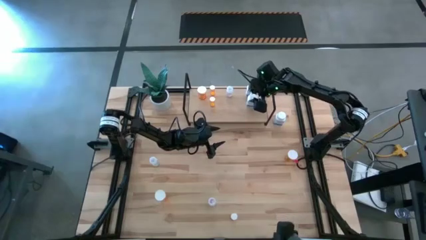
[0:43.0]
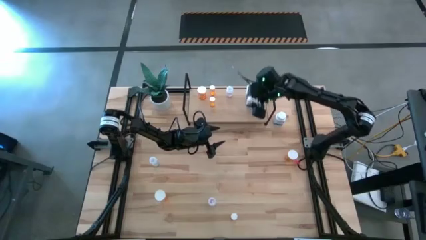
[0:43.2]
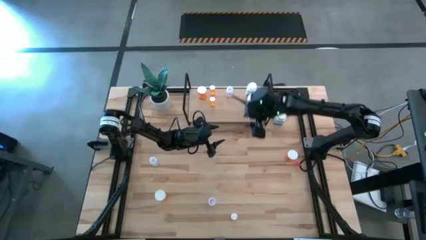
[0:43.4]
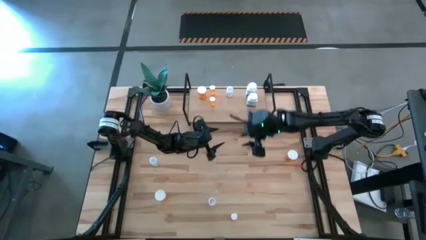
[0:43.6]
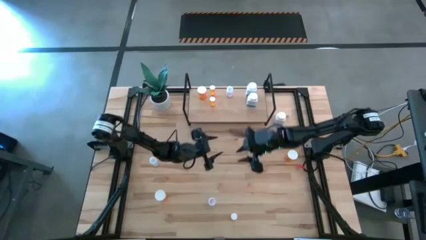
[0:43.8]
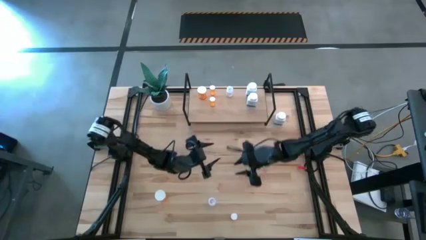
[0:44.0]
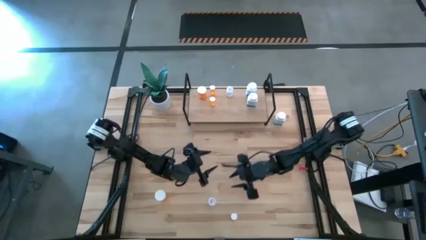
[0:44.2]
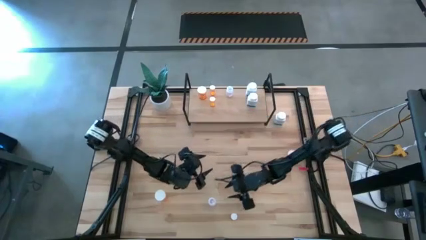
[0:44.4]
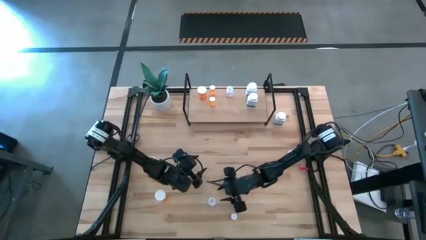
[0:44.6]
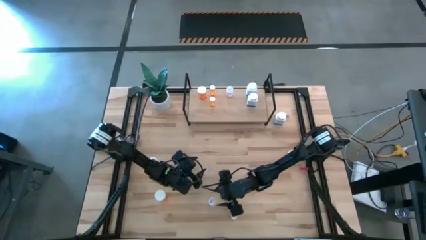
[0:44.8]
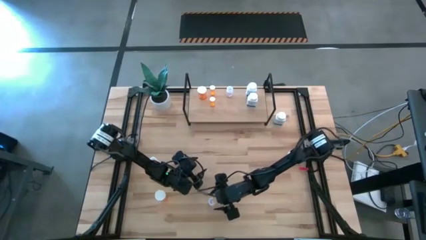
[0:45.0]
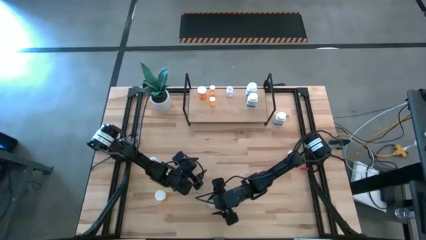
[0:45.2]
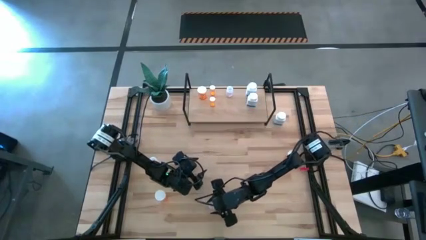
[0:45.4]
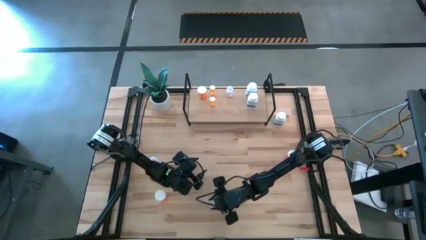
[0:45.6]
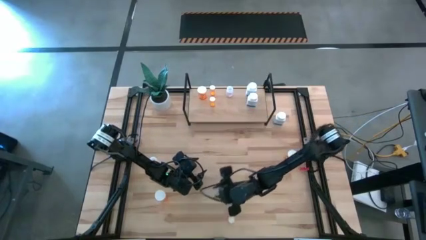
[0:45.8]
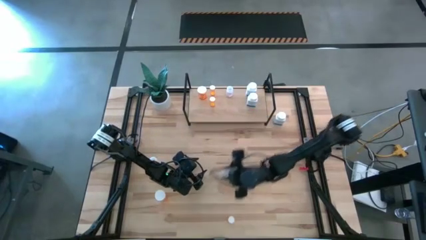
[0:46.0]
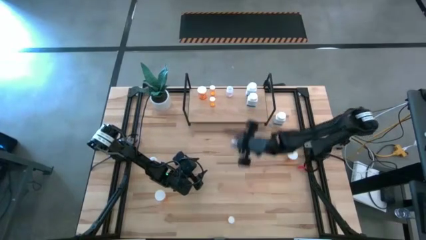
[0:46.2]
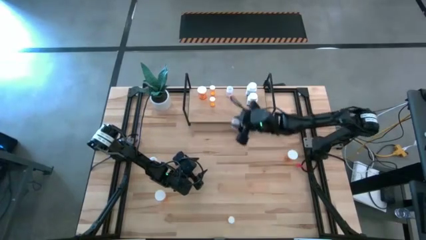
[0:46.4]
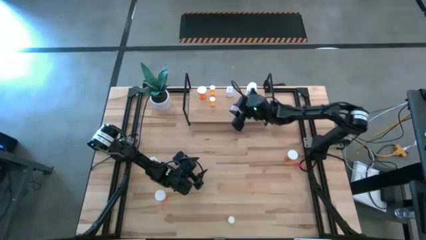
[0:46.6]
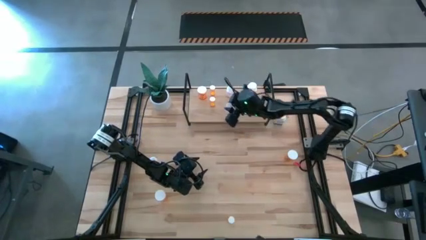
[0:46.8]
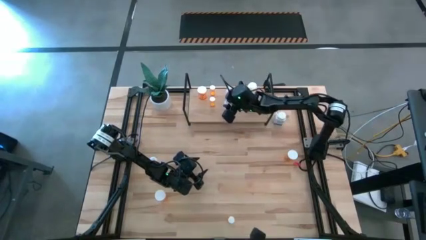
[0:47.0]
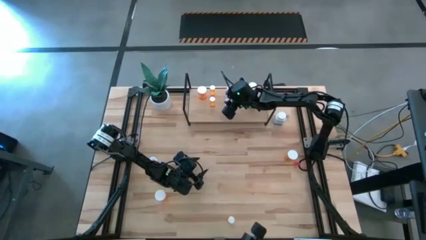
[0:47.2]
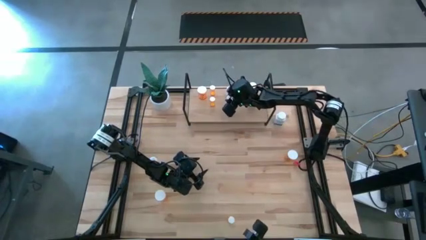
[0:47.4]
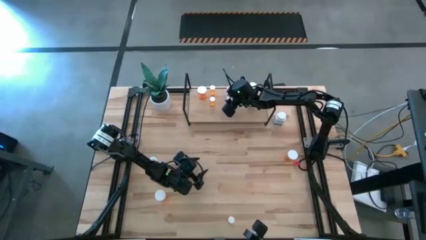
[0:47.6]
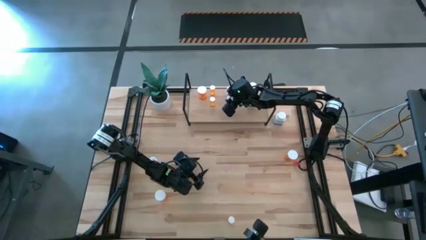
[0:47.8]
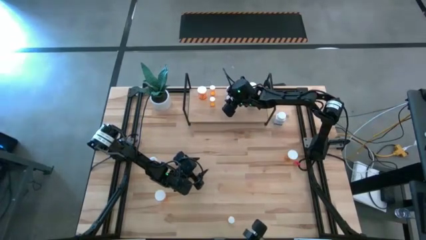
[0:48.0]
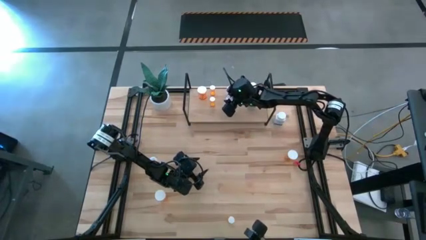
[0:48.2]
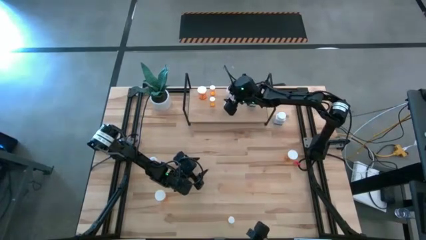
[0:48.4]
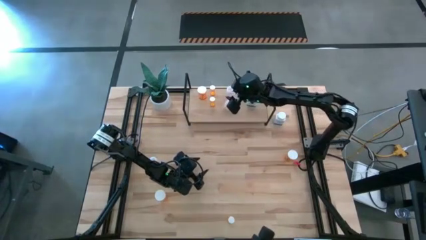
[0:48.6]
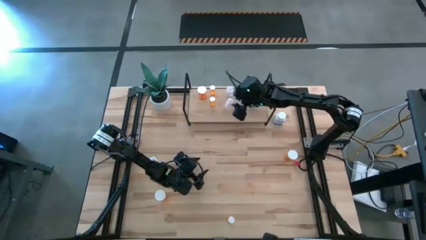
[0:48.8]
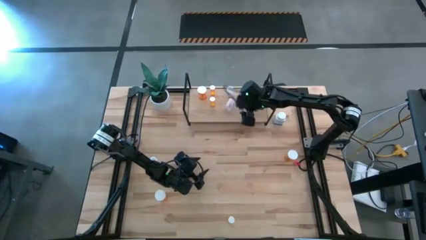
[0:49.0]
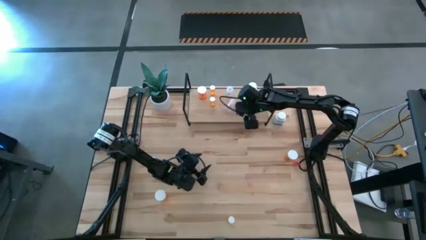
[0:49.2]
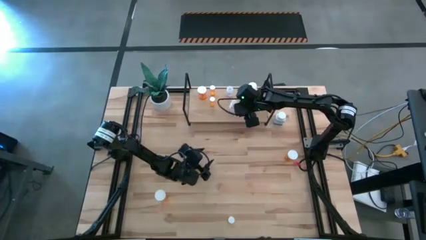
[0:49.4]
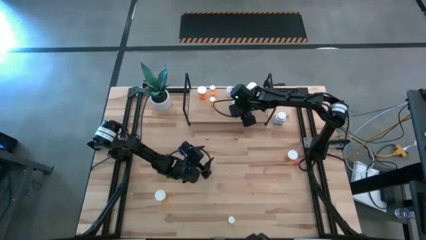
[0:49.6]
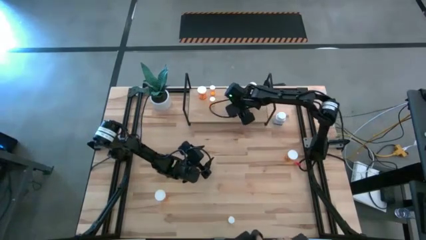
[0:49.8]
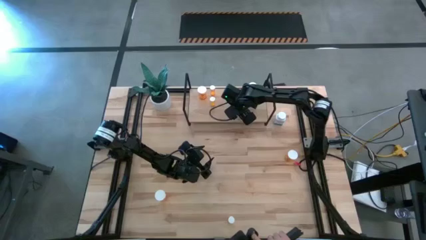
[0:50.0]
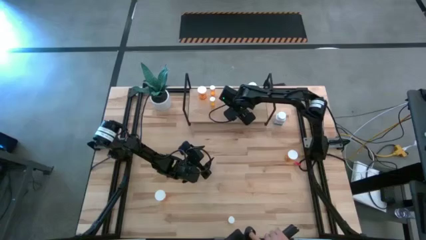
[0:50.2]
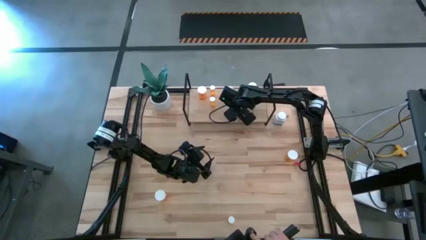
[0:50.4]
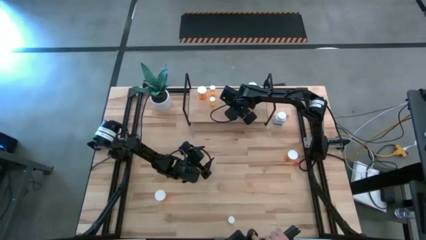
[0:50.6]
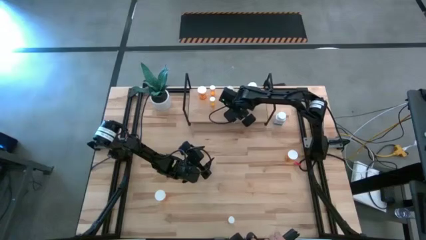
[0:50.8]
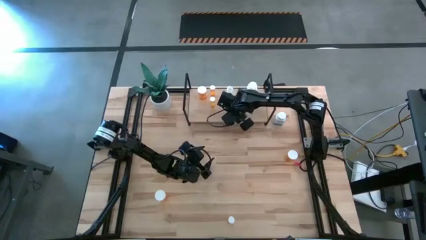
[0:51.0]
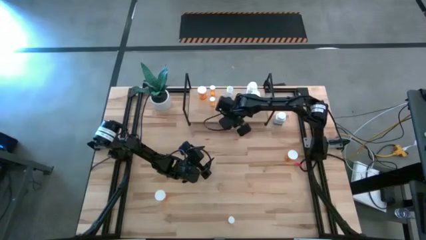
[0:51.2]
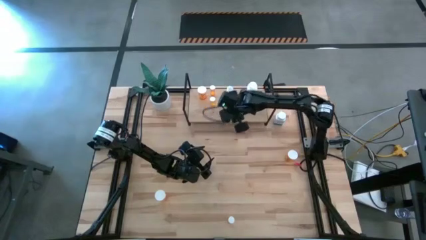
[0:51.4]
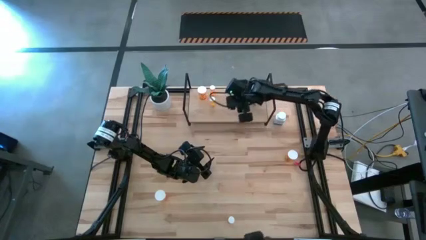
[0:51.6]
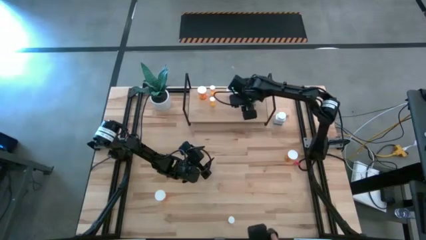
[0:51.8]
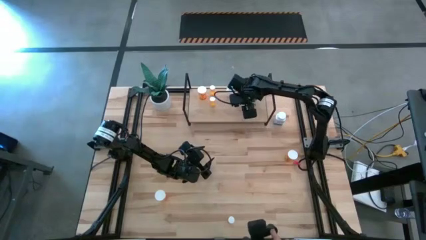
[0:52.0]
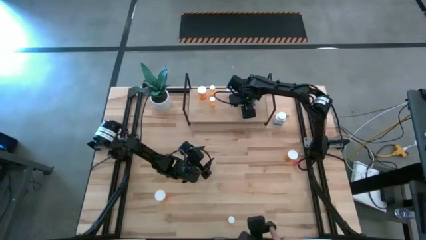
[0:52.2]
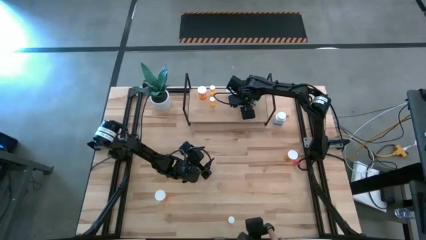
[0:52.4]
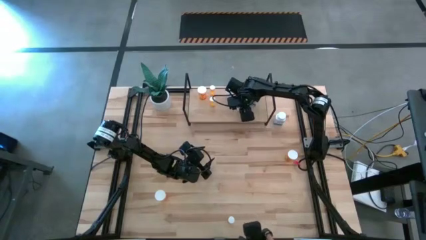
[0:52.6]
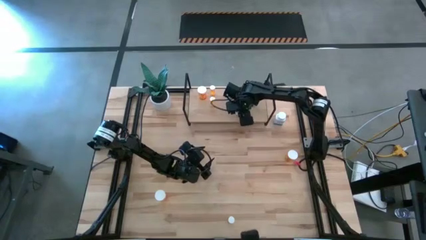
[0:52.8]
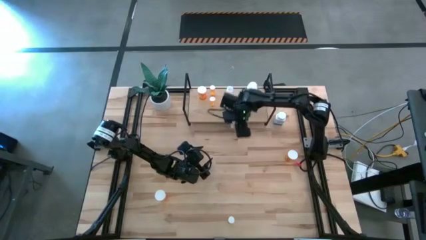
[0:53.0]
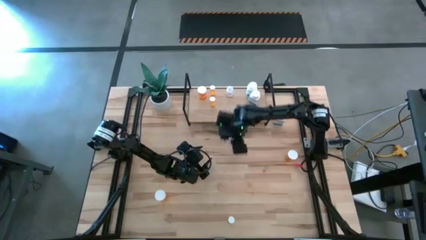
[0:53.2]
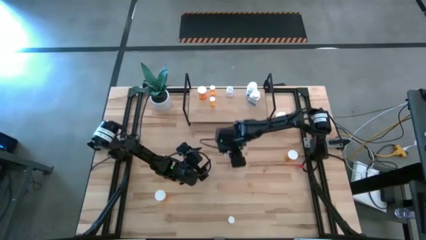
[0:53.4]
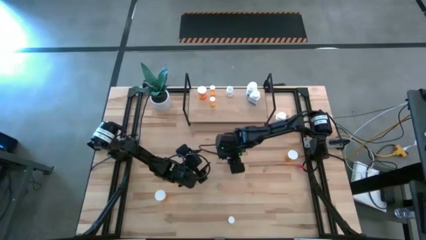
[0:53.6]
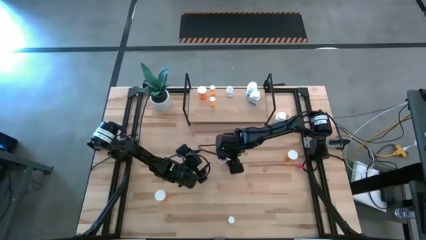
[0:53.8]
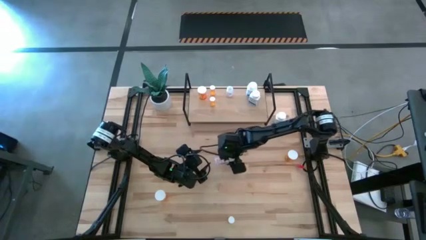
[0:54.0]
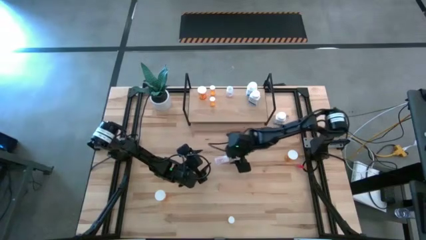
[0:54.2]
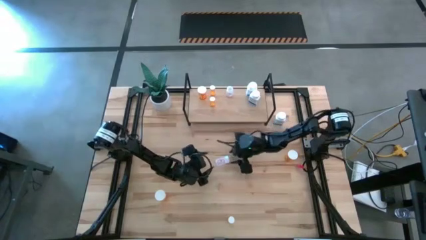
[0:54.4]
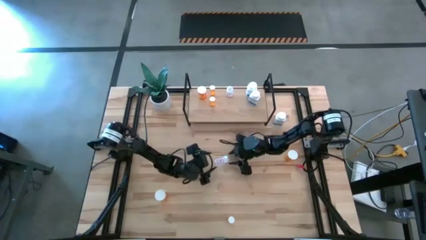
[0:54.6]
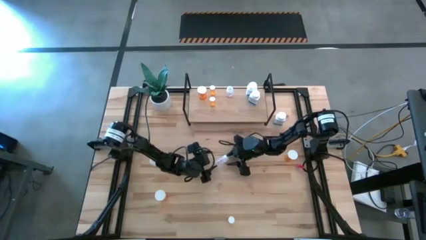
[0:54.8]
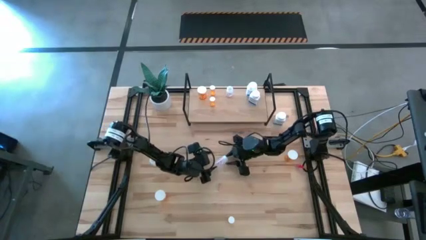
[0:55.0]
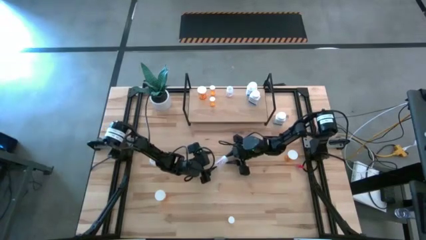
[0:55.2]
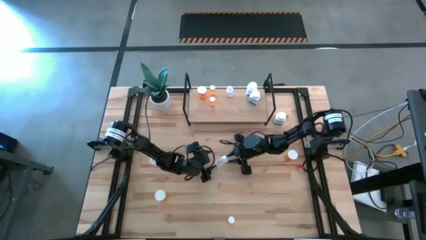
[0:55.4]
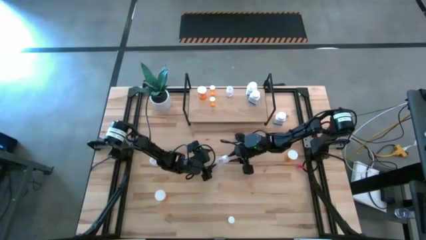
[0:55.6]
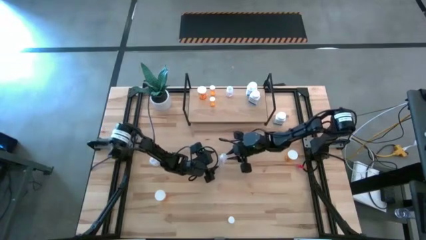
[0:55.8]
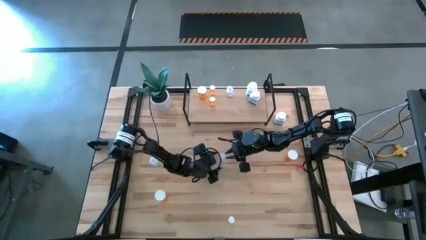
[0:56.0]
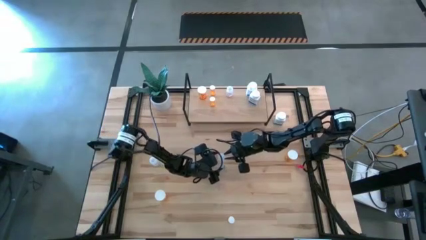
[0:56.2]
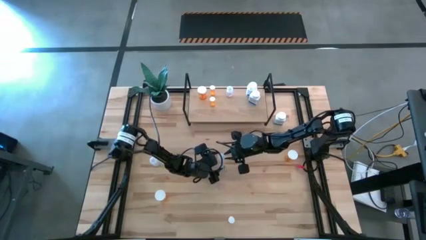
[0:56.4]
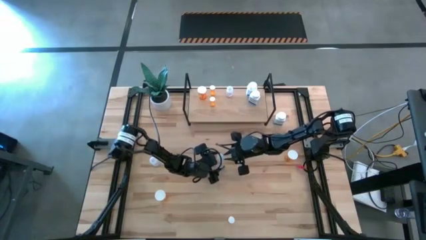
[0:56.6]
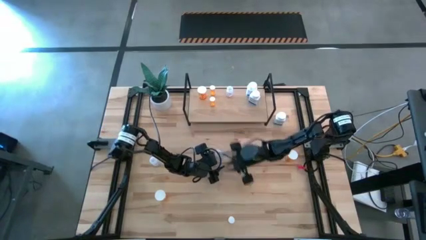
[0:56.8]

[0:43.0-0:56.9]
Task: Pick and place medicine bottles onto shelf by color
Put the bottom transparent pill bottle on the shelf aligned with the transparent pill bottle

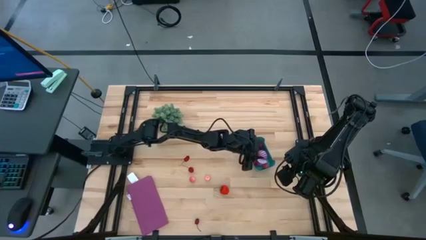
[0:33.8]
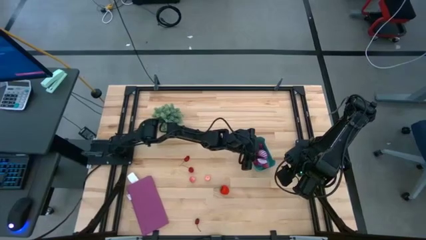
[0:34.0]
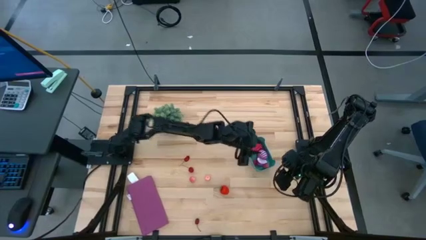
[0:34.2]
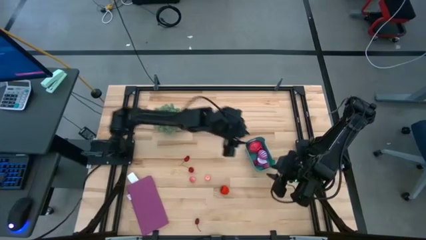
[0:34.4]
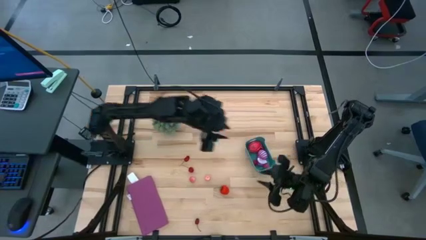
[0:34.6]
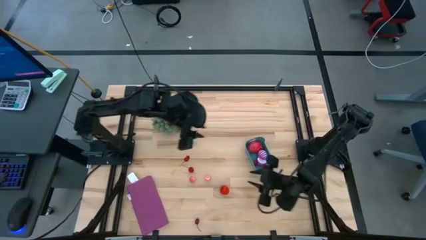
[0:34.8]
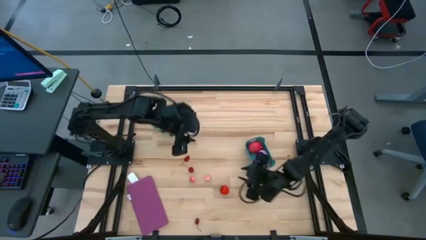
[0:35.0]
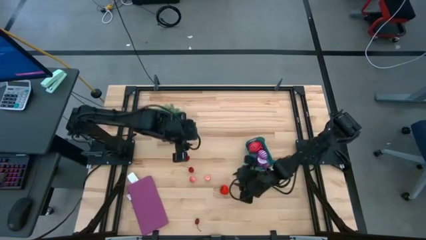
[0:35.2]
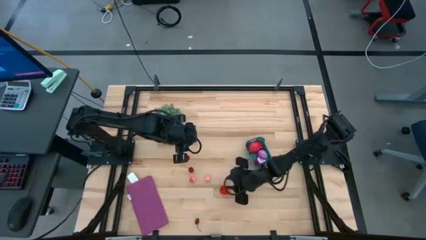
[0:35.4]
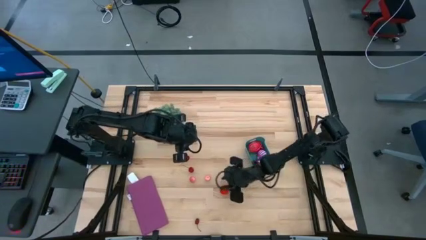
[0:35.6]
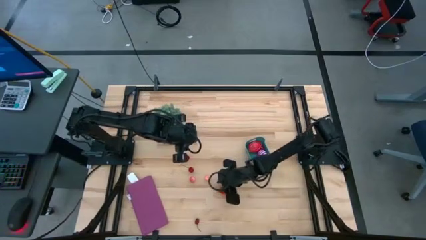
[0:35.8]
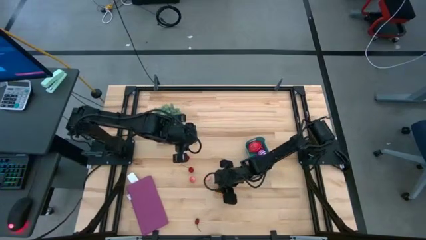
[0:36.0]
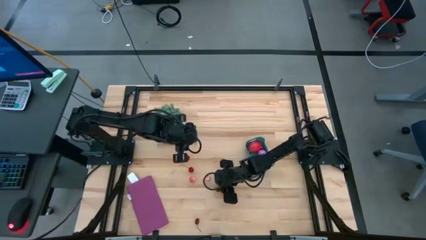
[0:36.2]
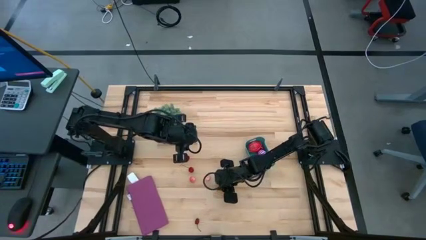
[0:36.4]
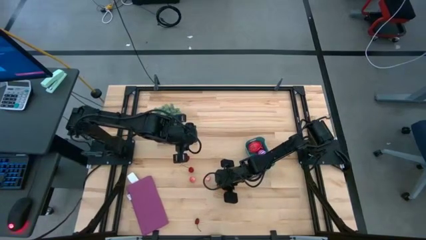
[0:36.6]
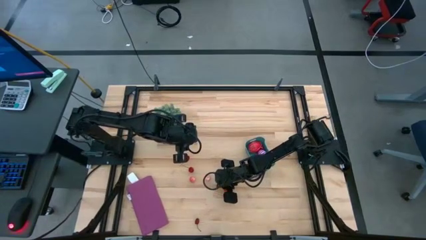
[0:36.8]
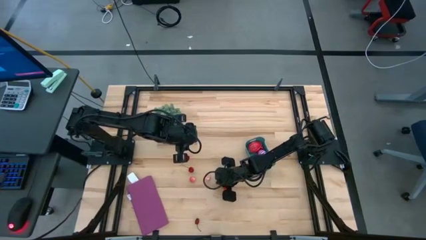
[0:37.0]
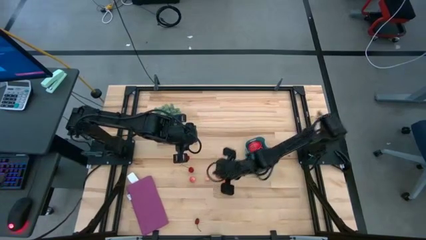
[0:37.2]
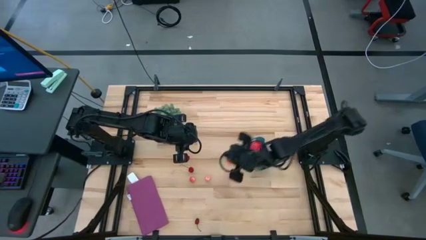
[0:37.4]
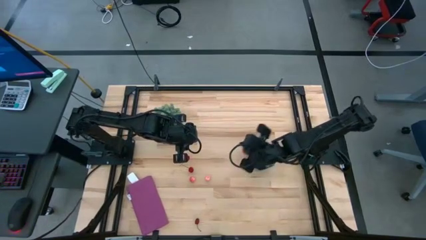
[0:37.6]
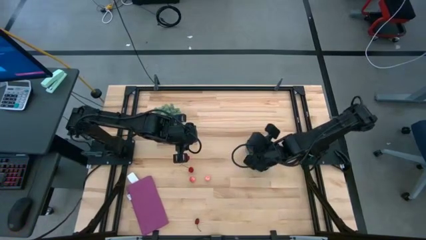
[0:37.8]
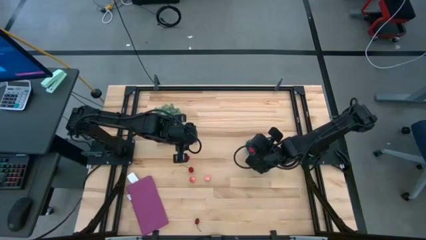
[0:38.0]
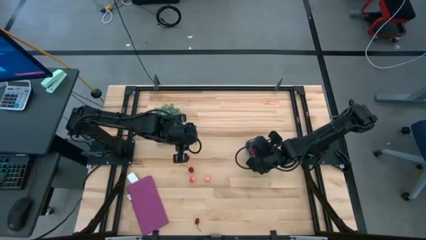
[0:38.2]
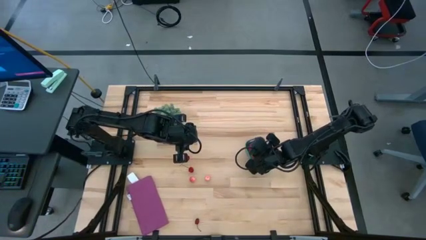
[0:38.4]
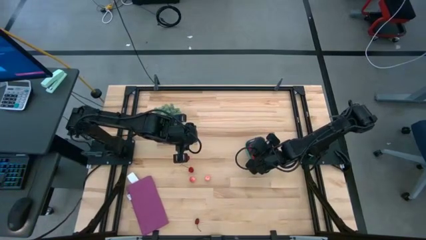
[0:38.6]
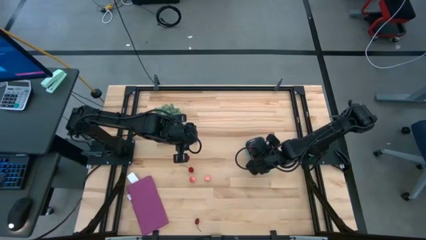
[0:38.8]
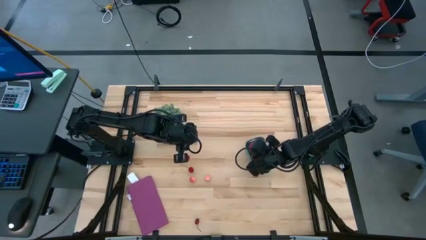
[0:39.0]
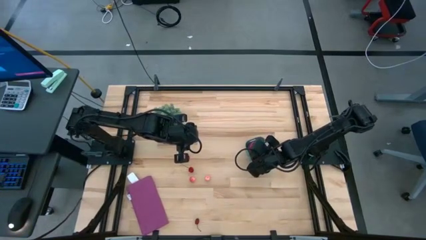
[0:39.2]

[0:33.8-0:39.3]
Task: Pick and placing Produce into tupperware
Put the strawberry in the basket
